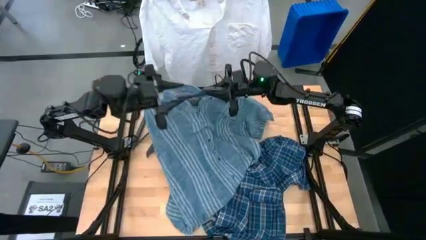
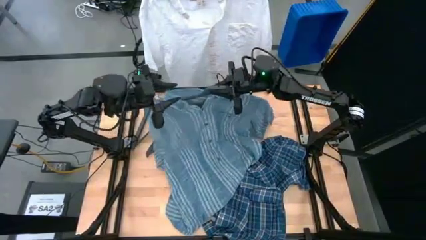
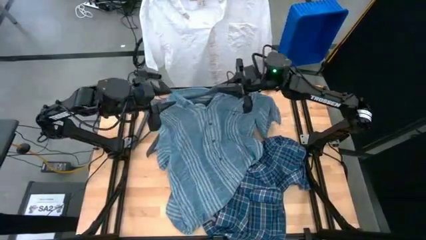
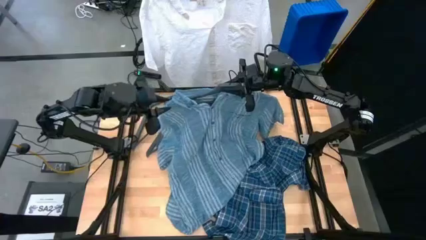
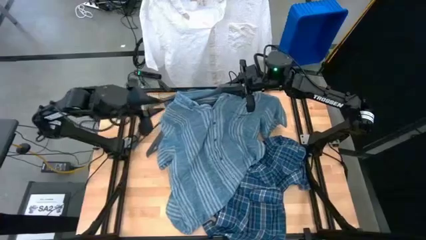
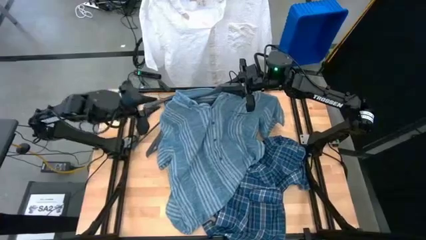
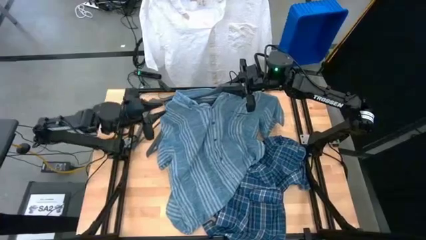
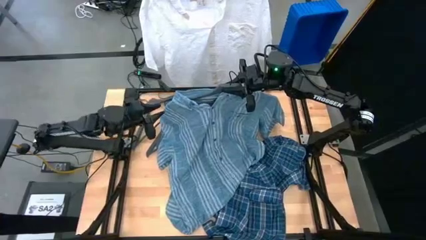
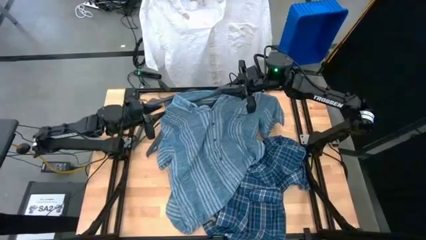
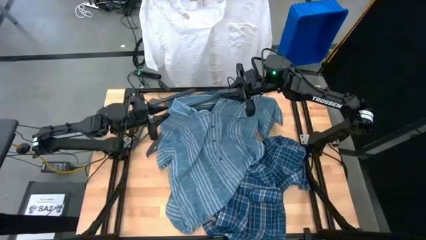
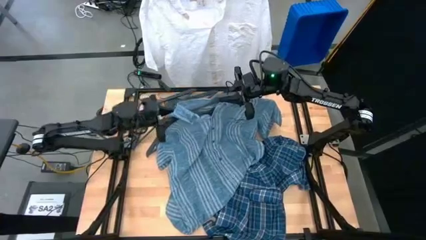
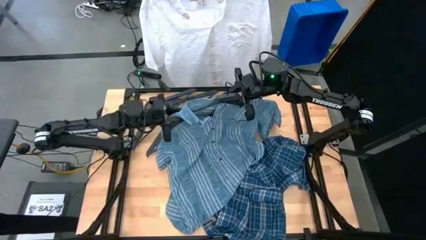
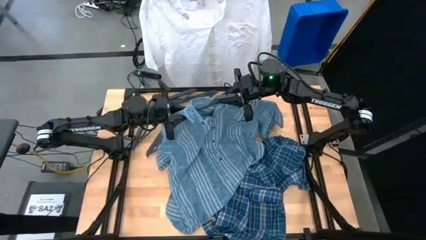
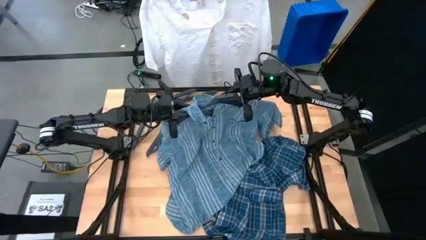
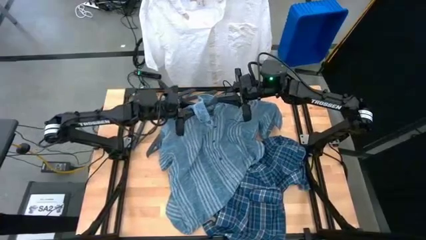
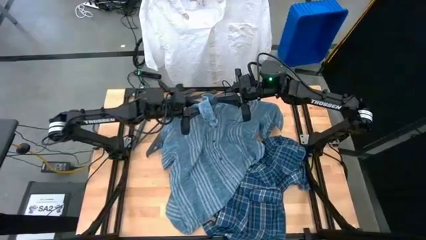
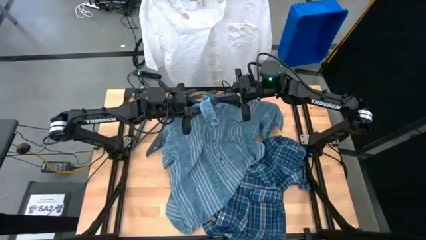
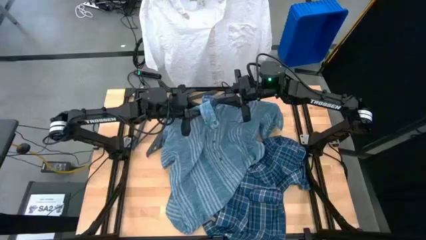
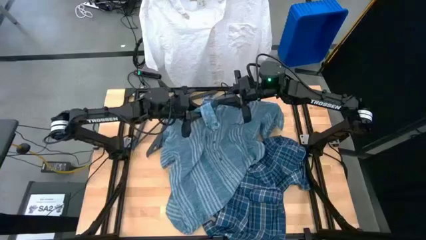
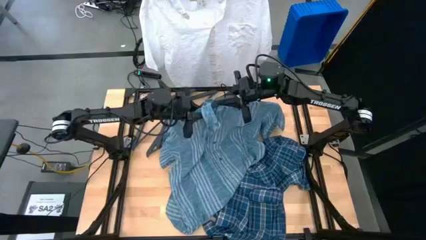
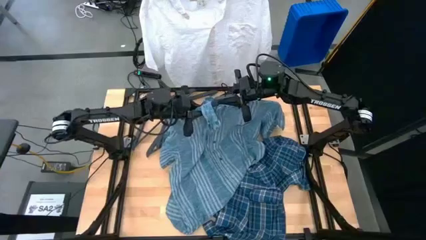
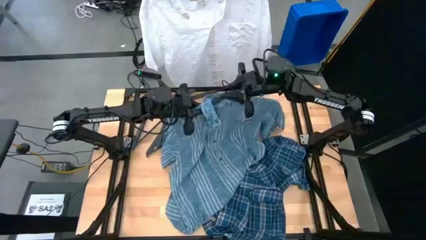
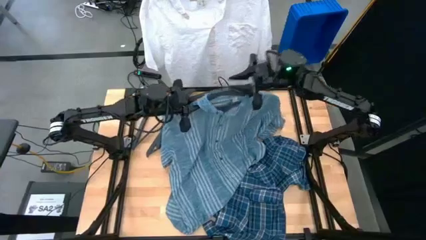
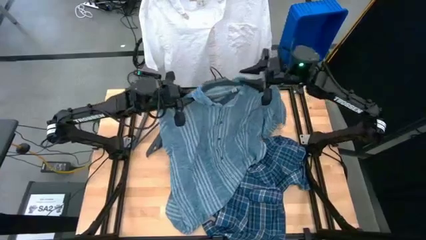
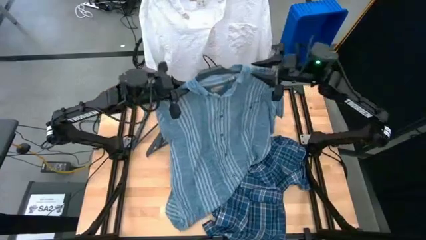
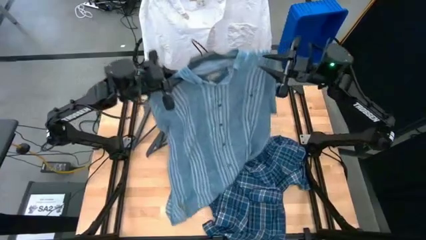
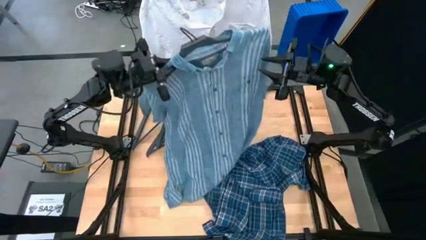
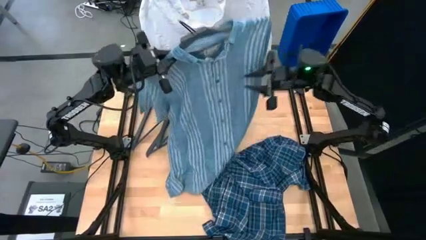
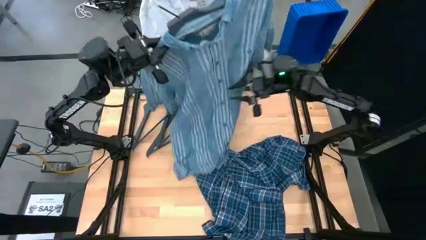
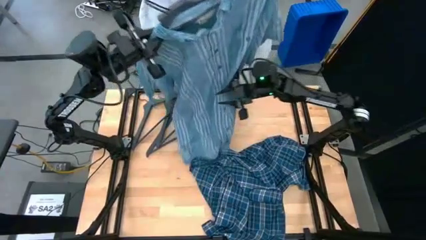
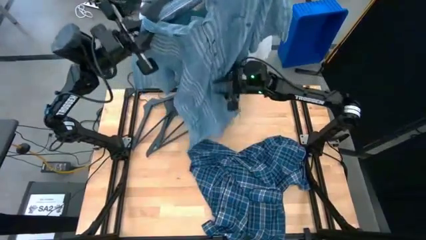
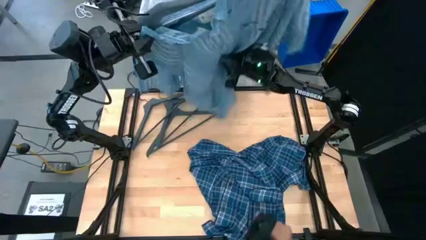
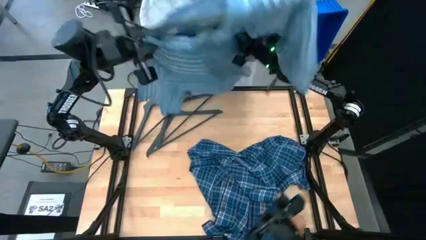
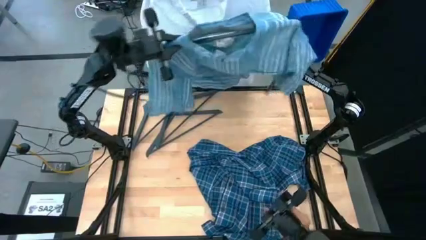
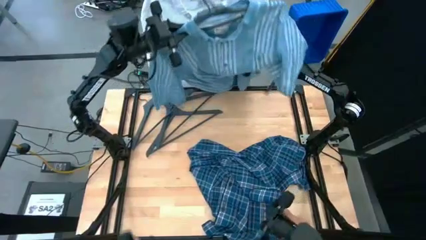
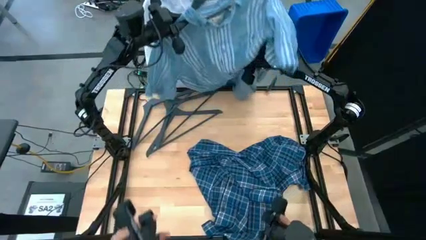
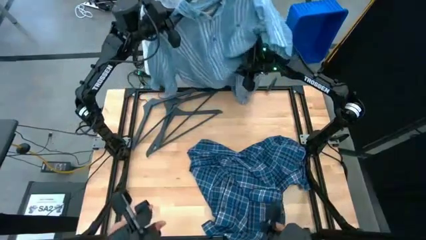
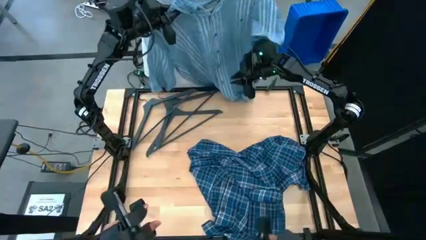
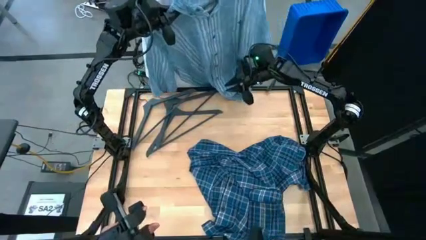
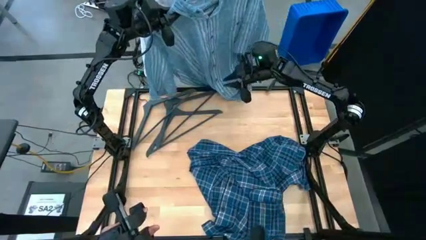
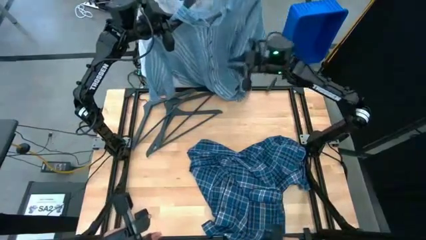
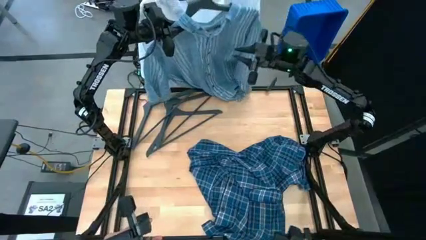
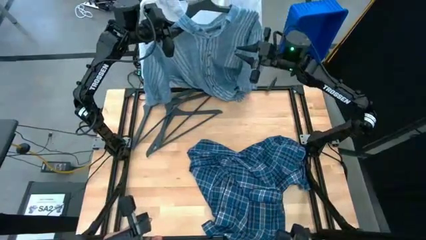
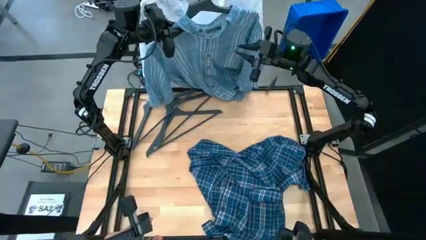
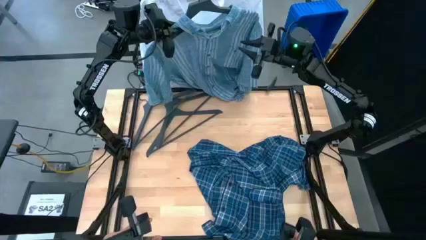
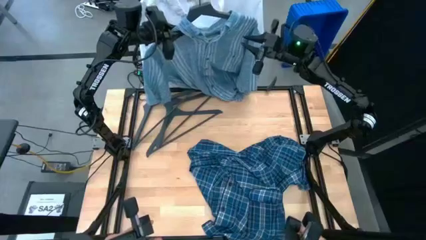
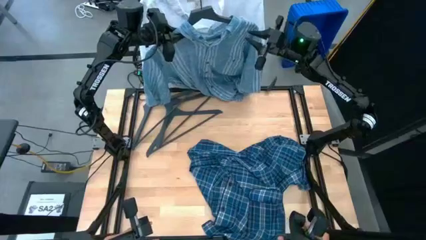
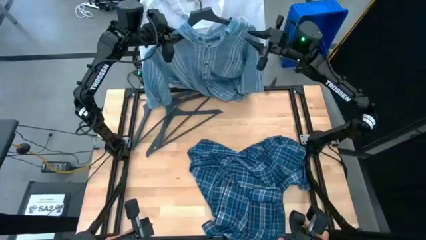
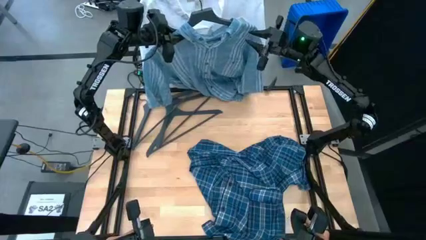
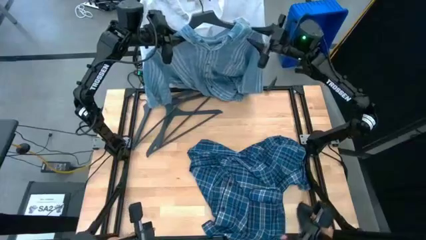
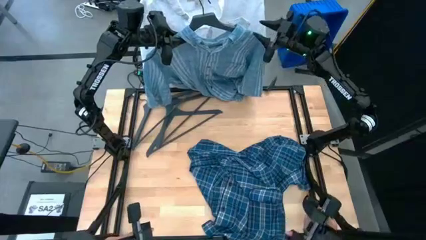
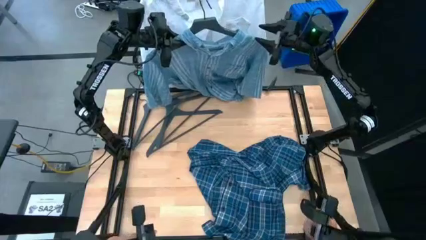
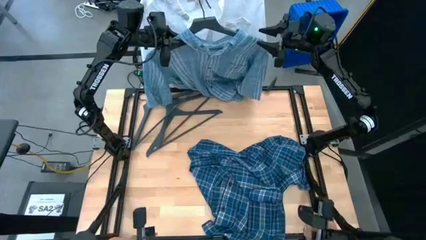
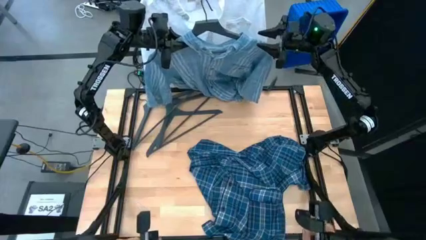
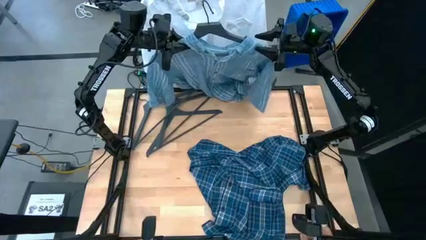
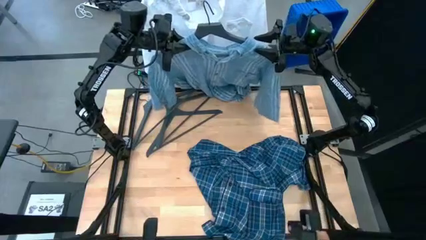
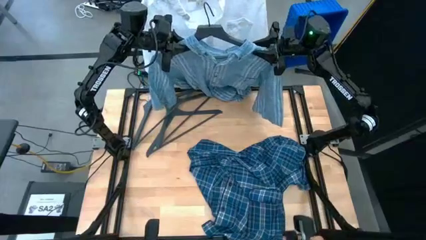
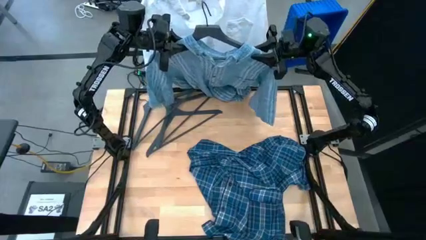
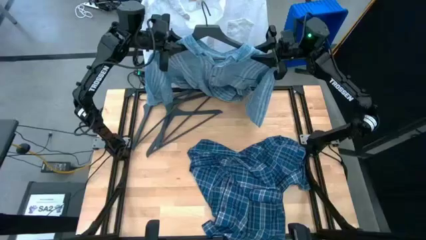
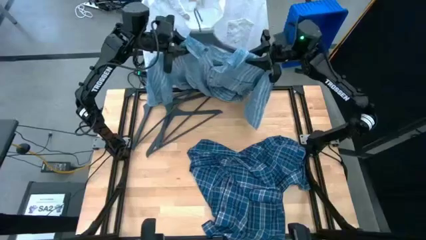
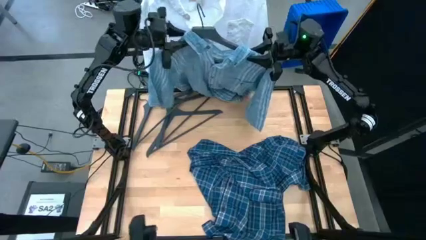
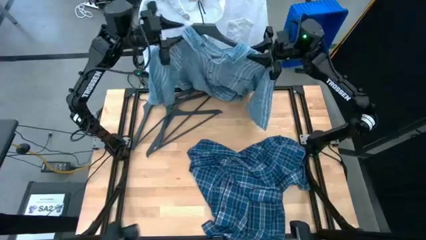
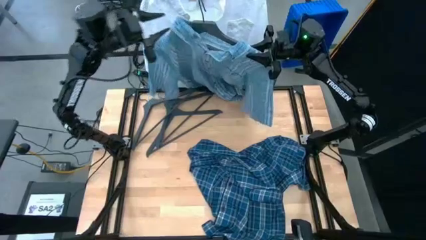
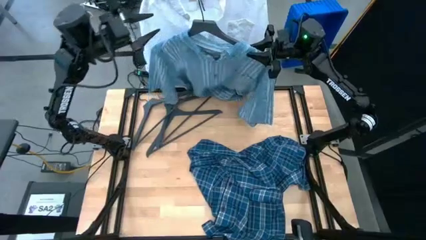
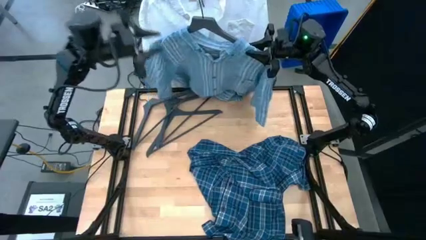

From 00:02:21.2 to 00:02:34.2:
Task: Hang clothes
Hang the green shirt on the hanging rack

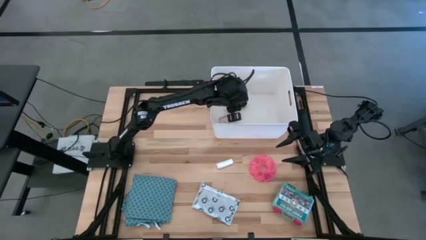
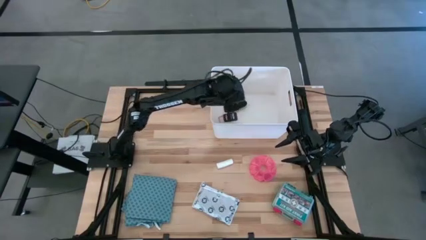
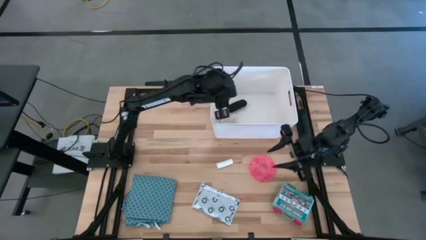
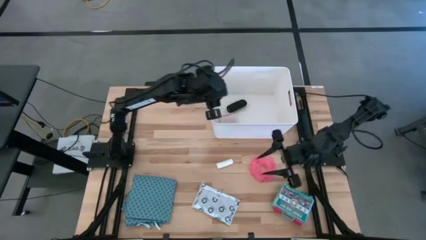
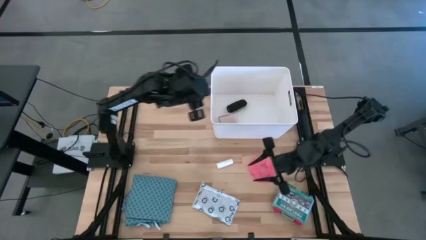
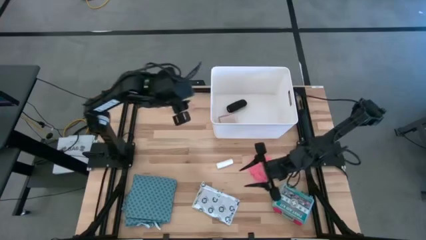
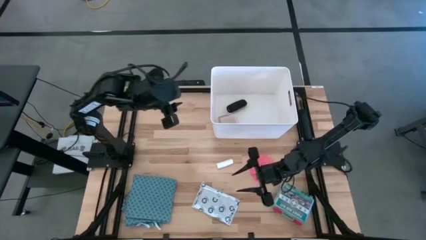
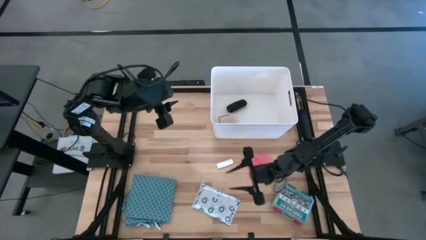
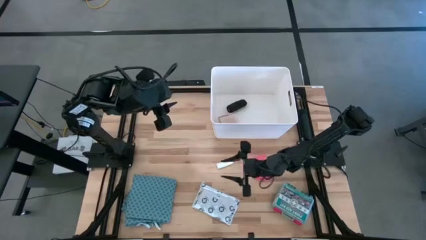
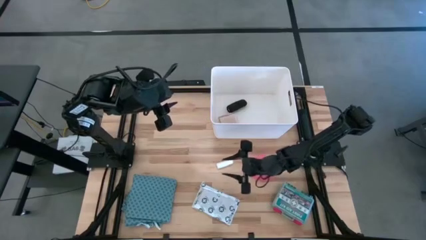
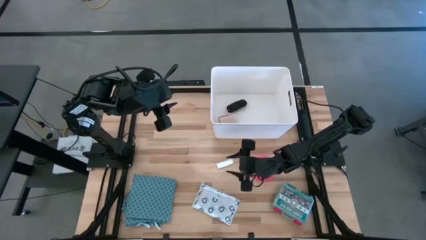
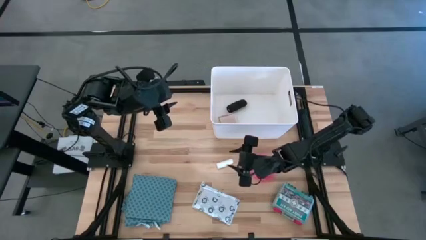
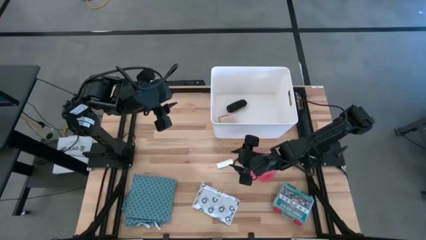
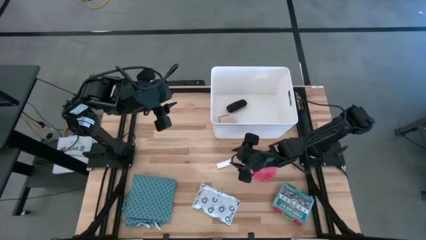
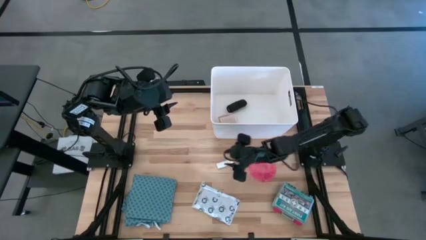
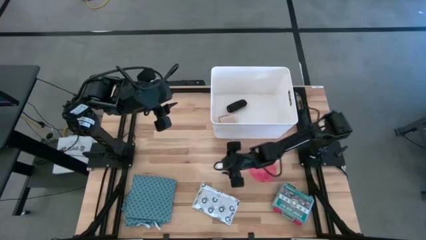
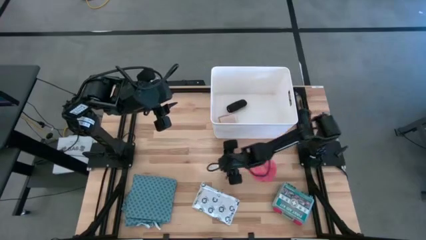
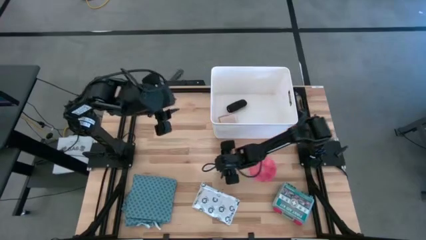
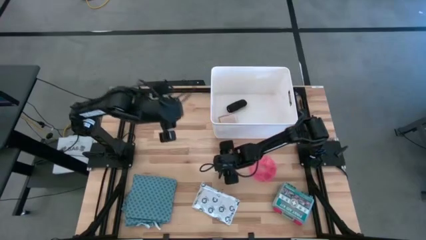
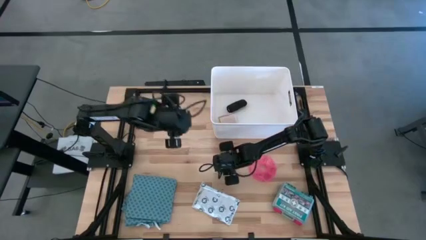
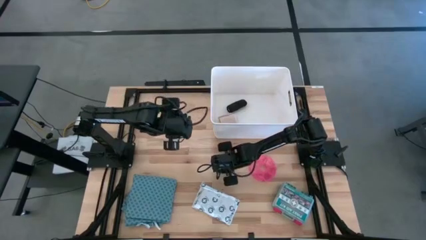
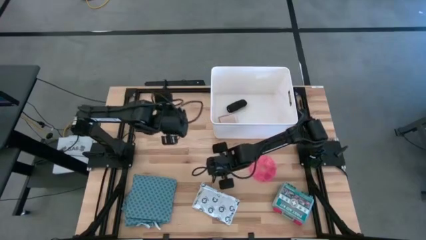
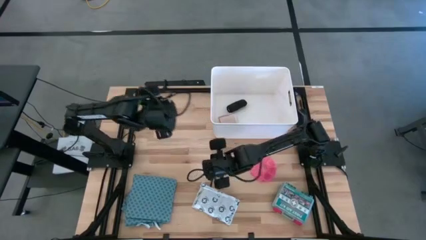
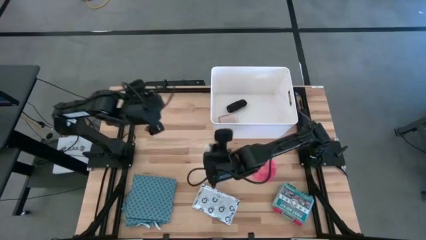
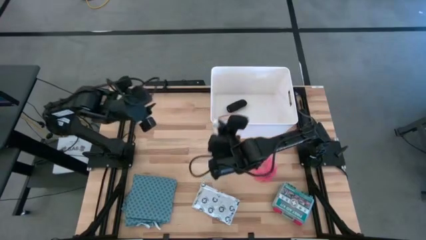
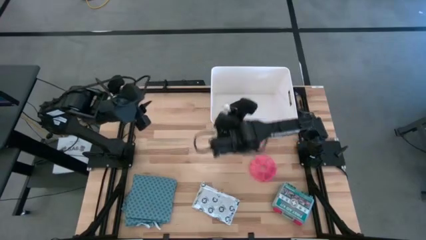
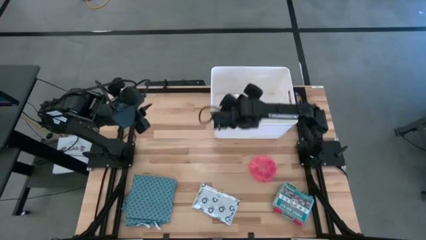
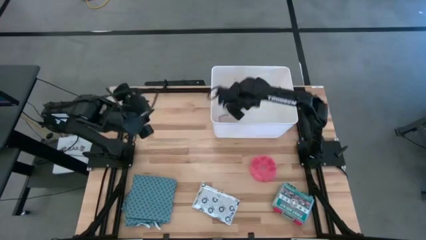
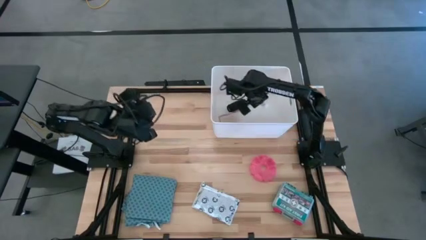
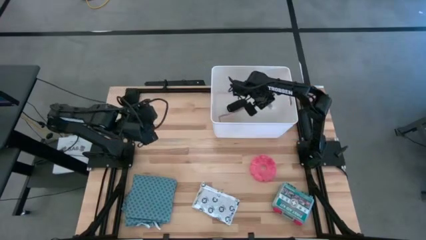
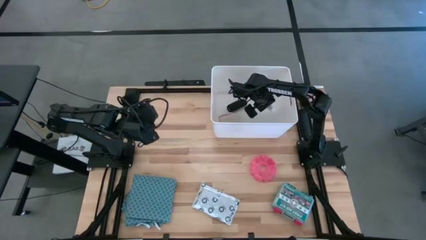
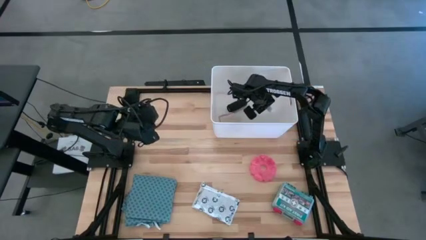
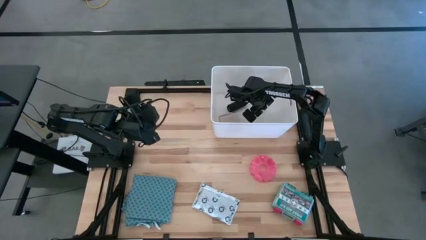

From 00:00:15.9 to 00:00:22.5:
Task: Pick & place medical supplies in basket/bin
Put the white gauze in the white bin
